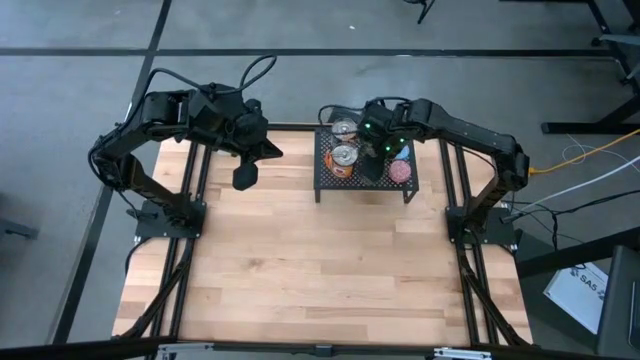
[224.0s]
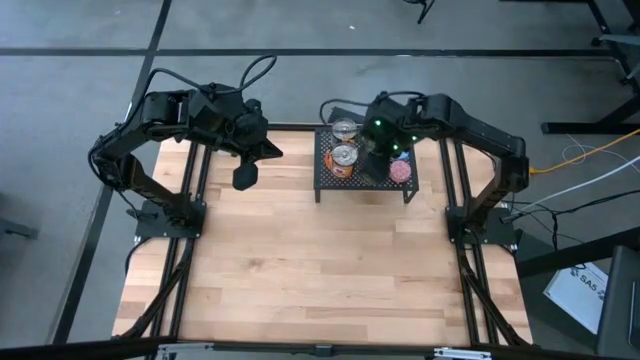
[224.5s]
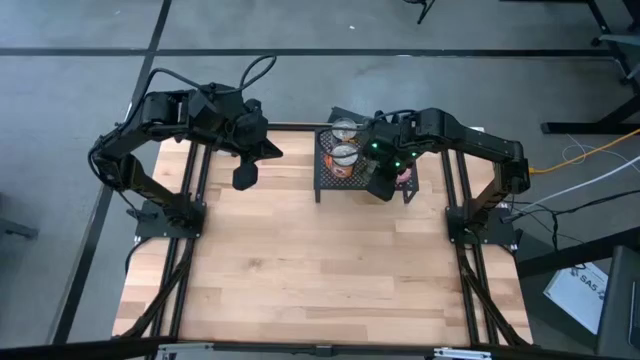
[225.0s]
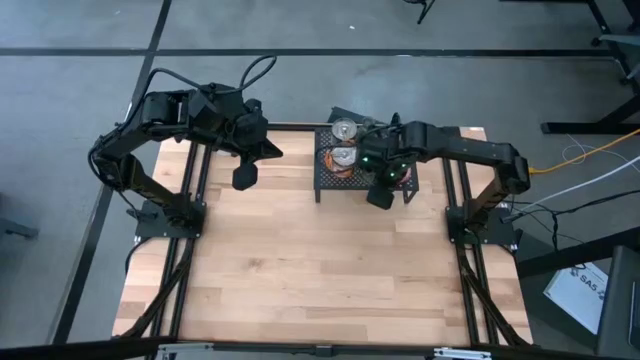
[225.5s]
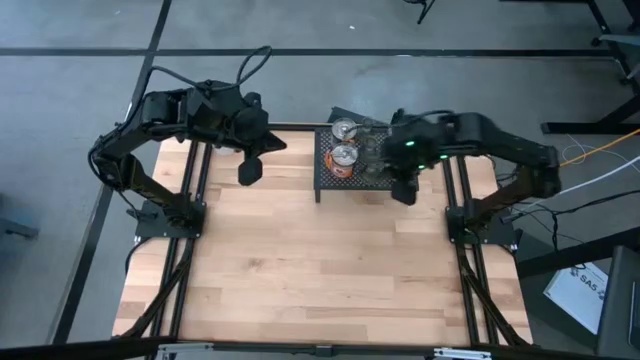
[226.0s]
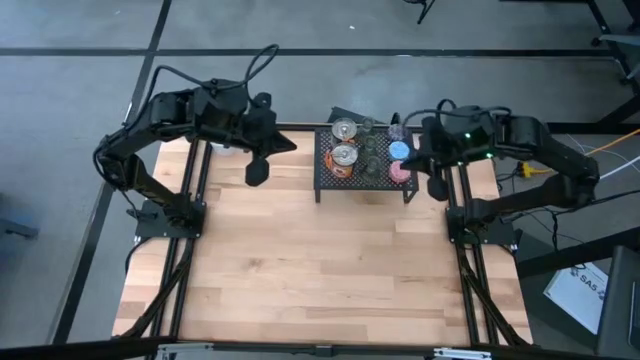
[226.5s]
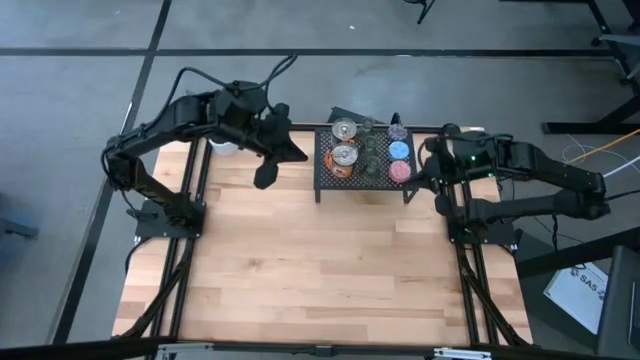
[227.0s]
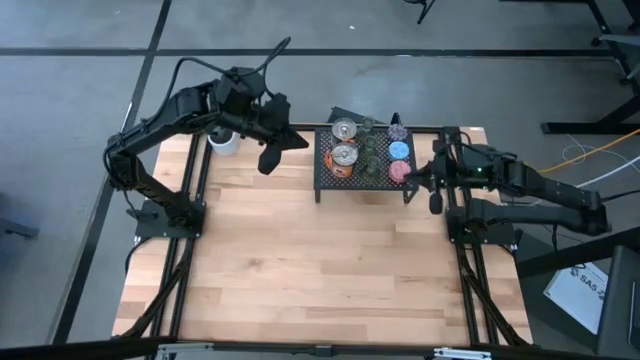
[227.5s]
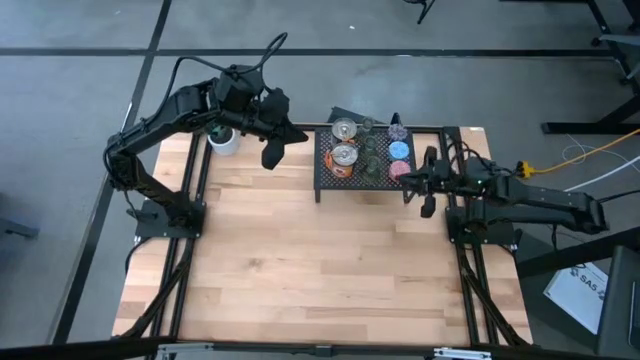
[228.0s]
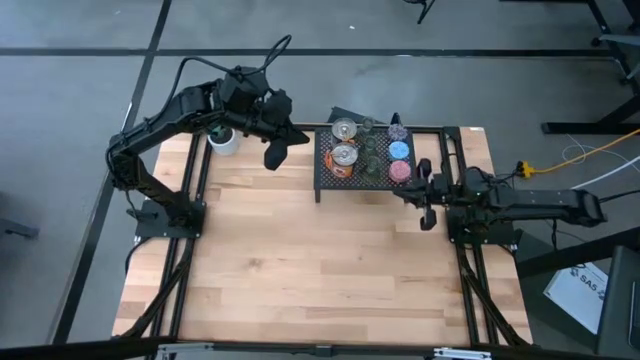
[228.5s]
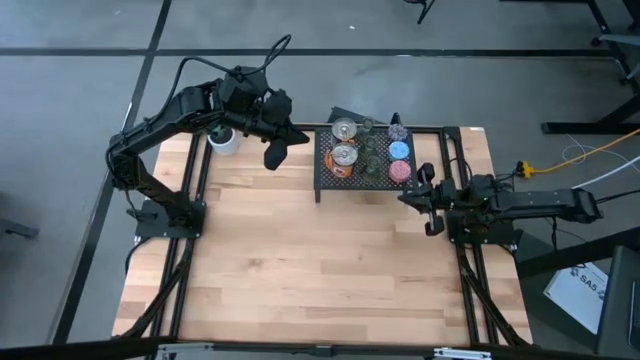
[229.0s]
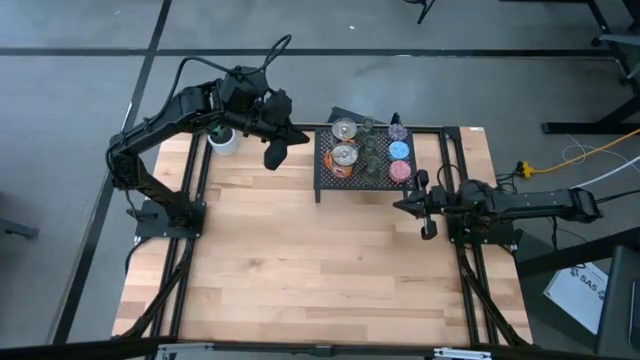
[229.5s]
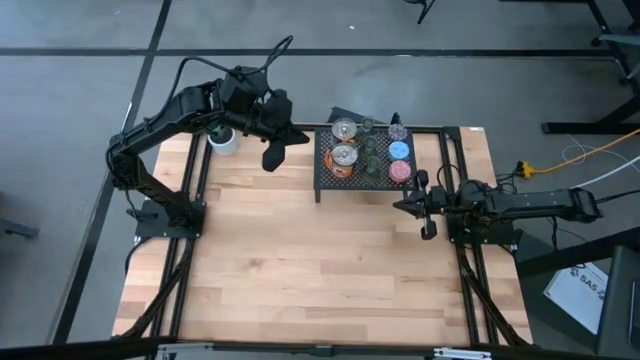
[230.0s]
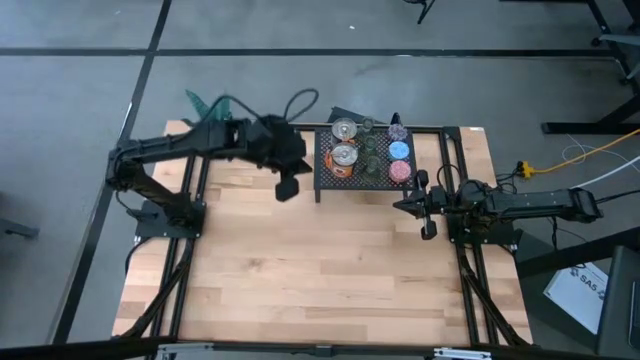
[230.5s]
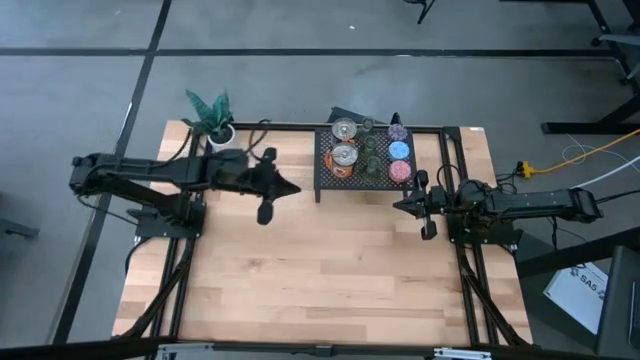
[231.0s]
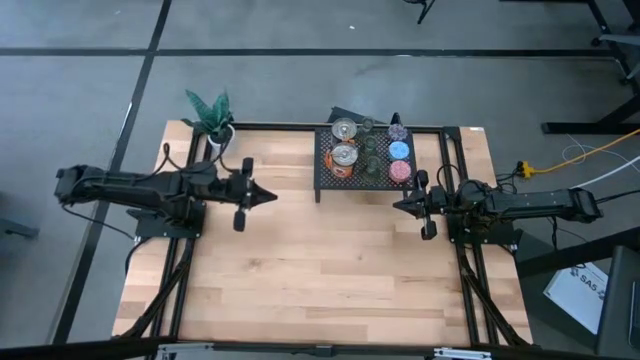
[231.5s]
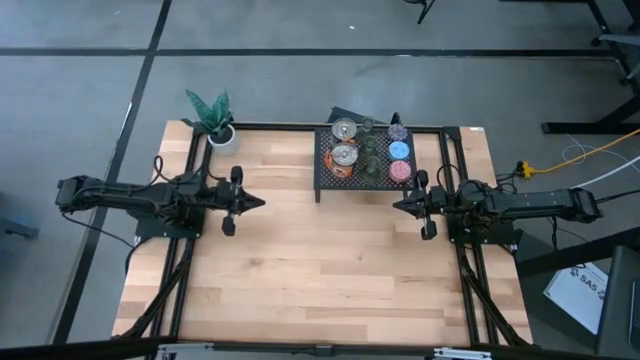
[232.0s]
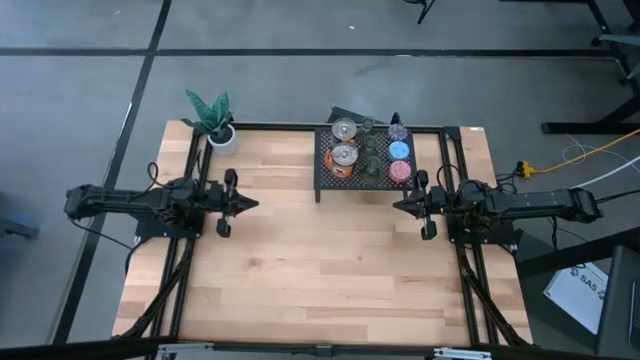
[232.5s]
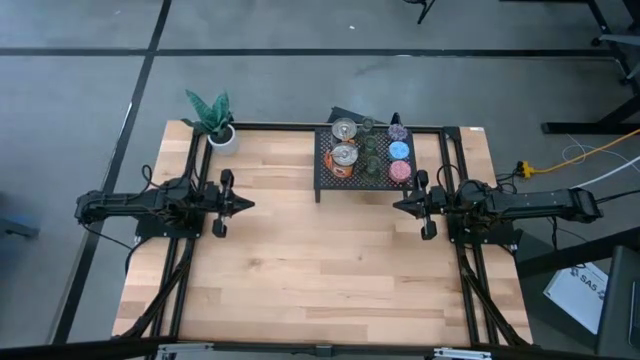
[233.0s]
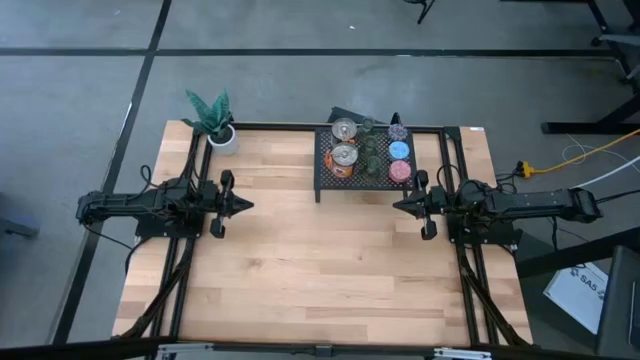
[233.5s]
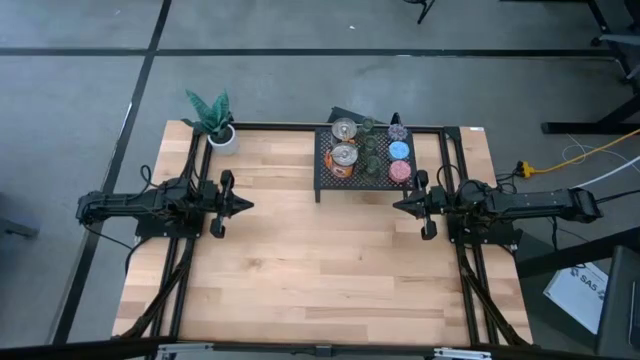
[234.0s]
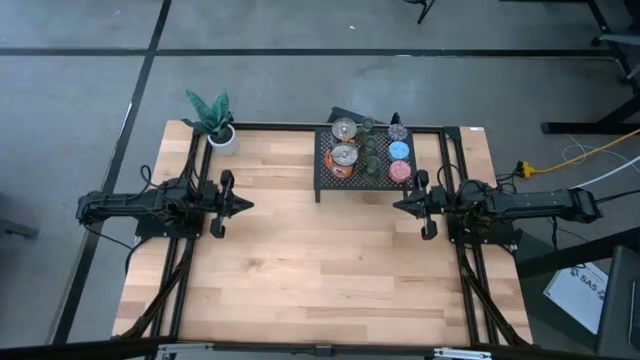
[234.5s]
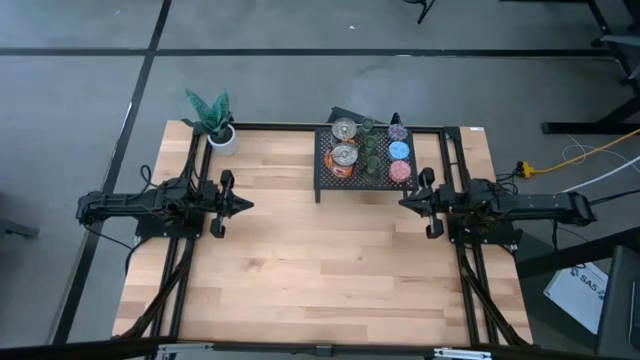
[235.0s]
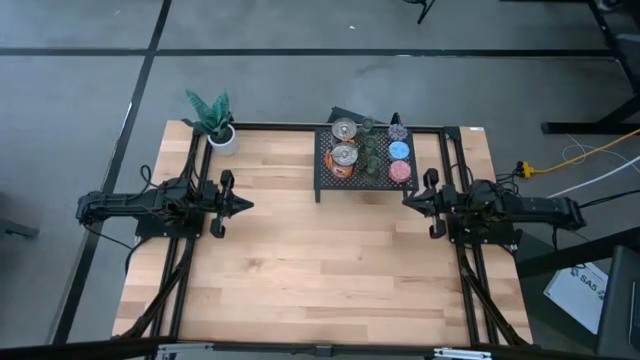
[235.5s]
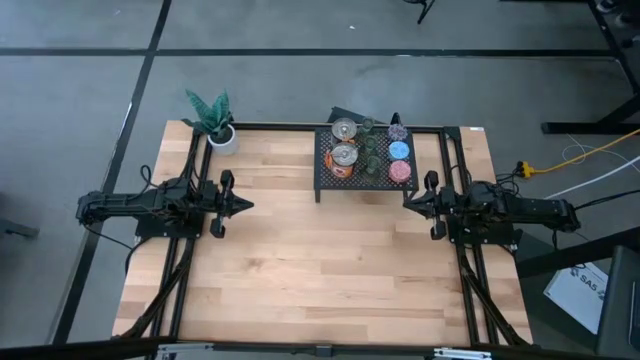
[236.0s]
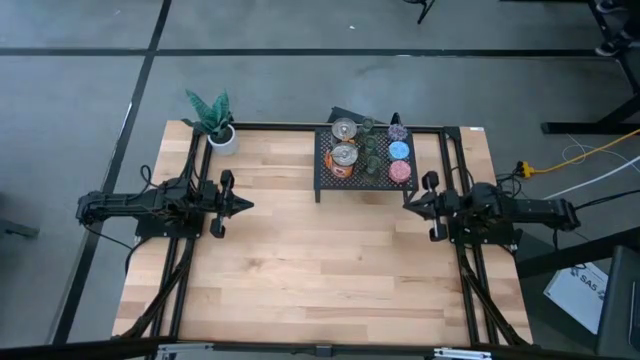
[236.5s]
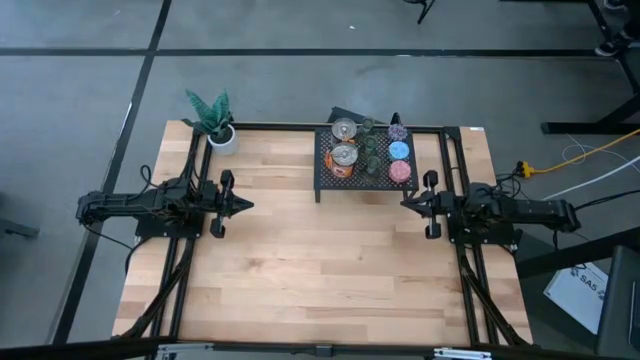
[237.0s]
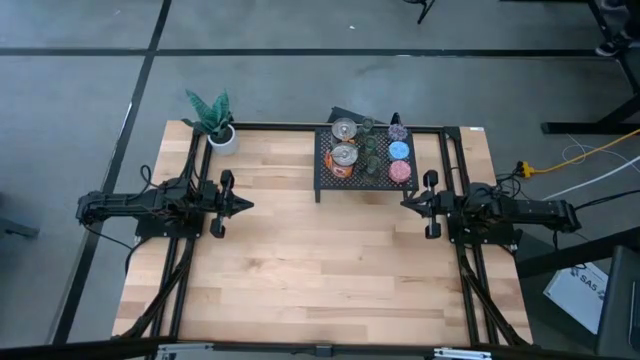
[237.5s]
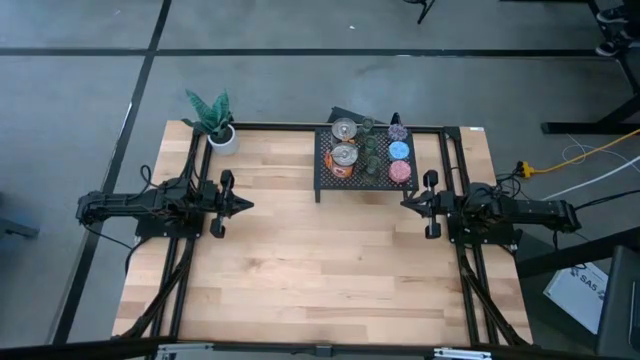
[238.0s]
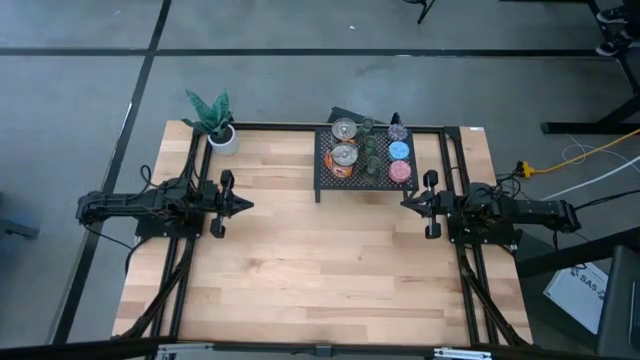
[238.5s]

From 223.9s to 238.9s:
Task: Pick & Place candle stick holders
Return to Home Position

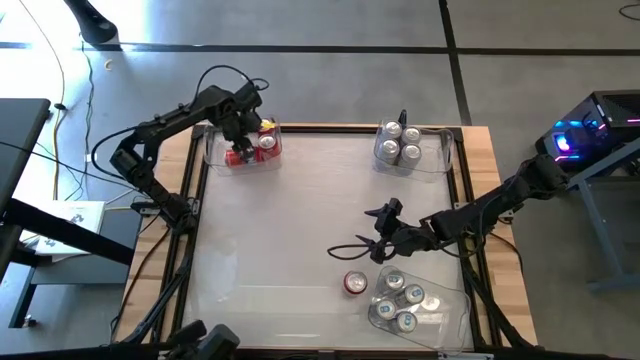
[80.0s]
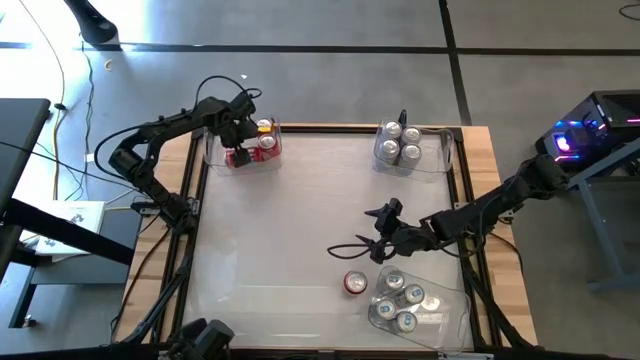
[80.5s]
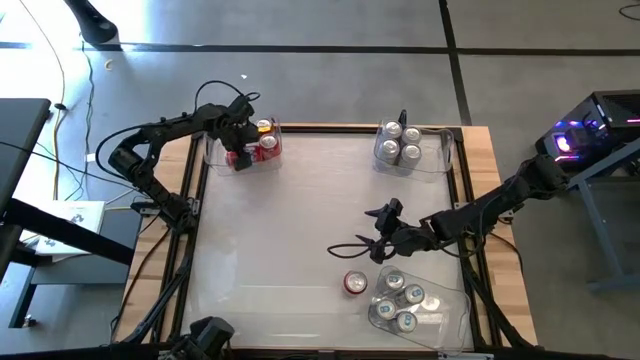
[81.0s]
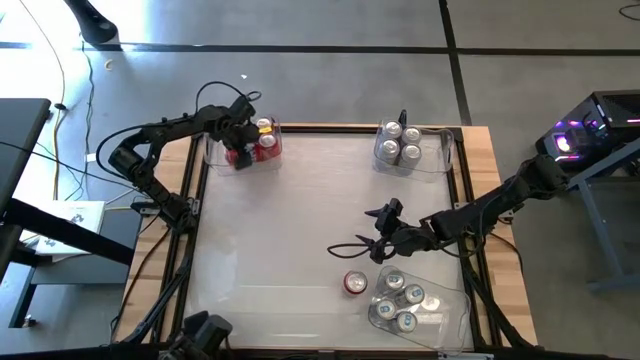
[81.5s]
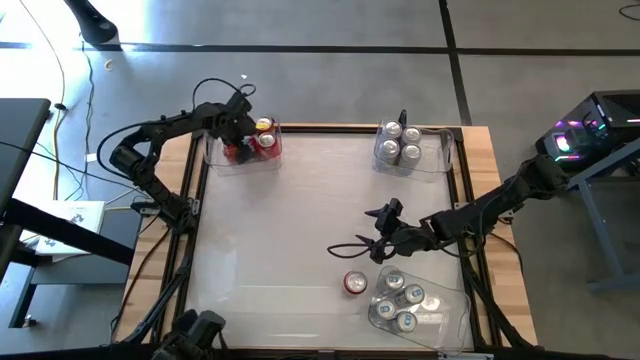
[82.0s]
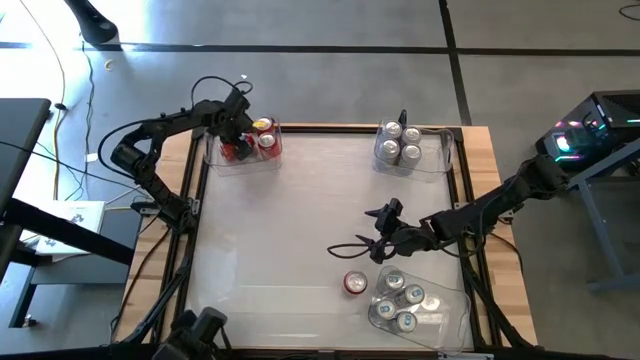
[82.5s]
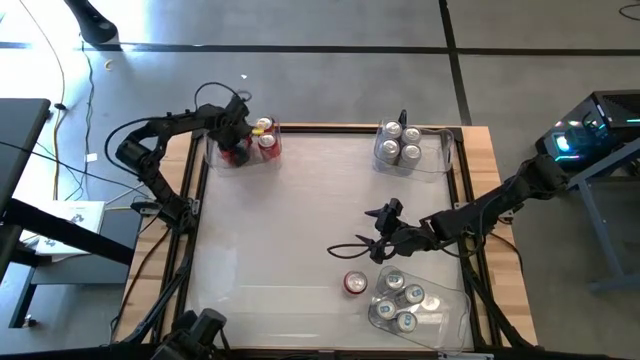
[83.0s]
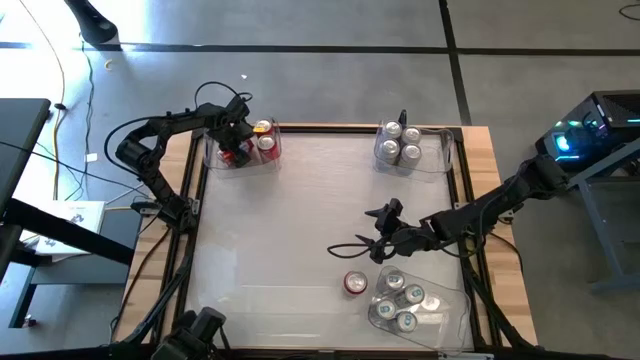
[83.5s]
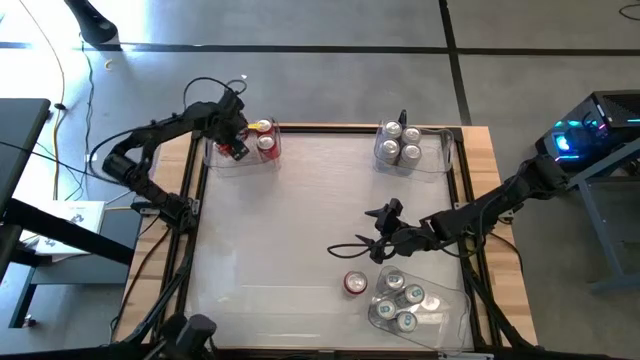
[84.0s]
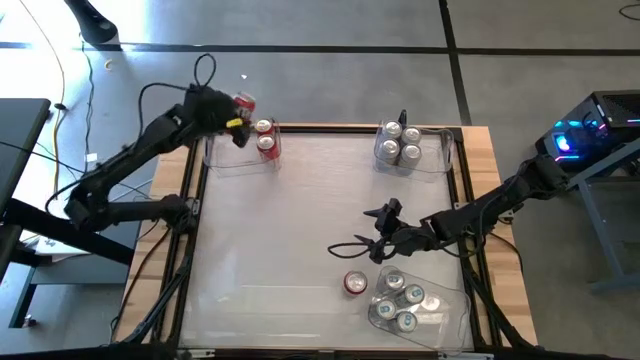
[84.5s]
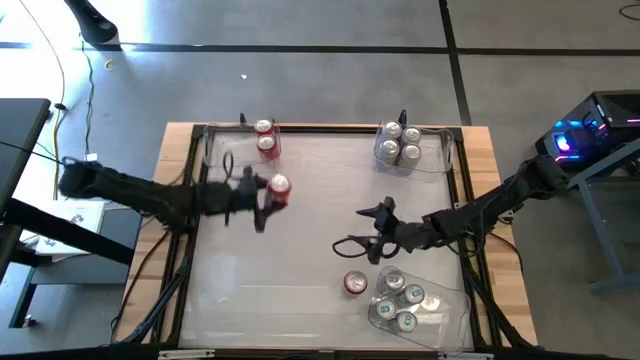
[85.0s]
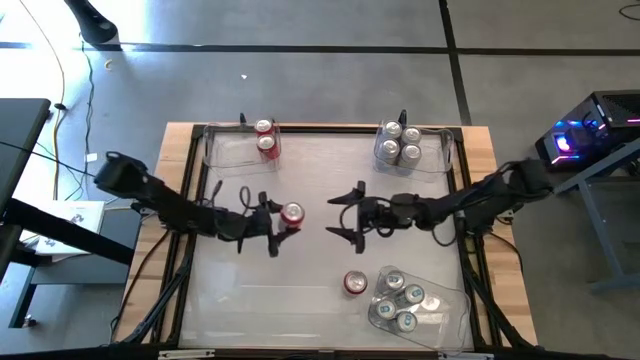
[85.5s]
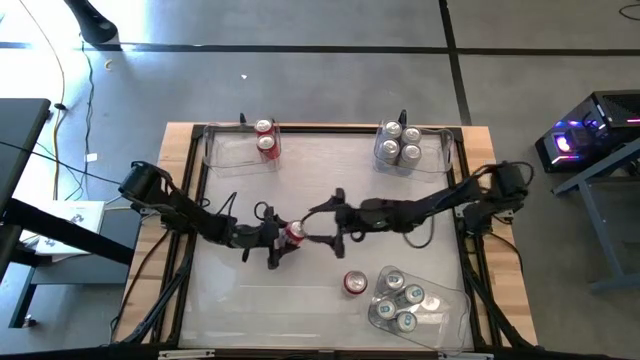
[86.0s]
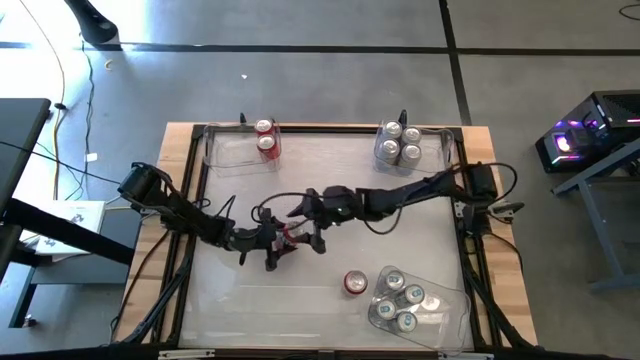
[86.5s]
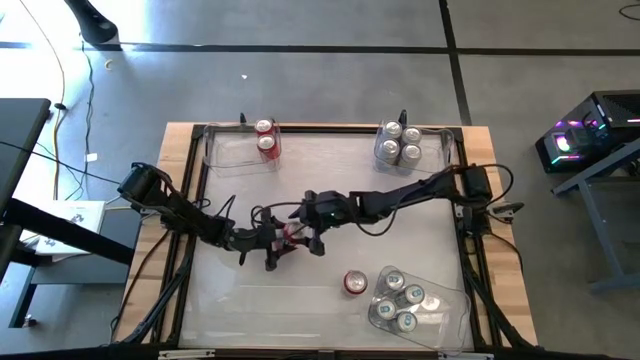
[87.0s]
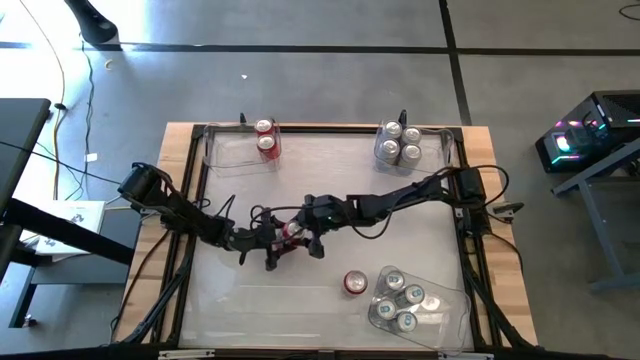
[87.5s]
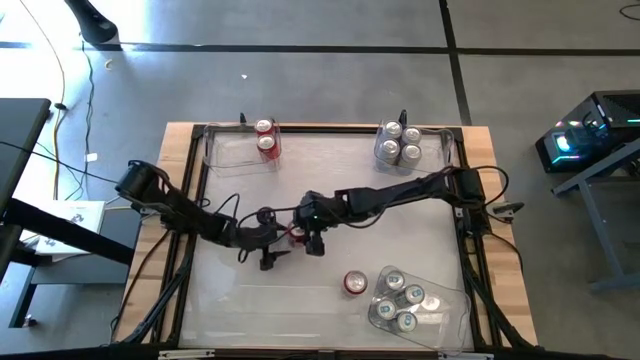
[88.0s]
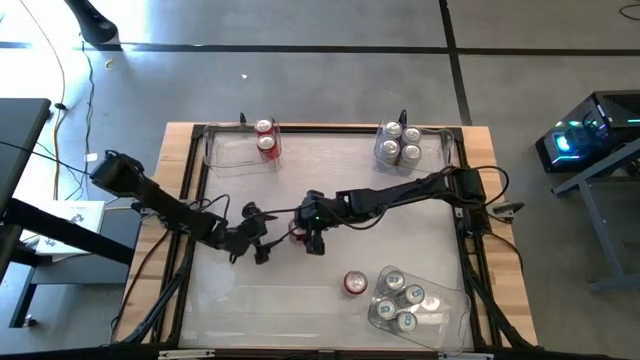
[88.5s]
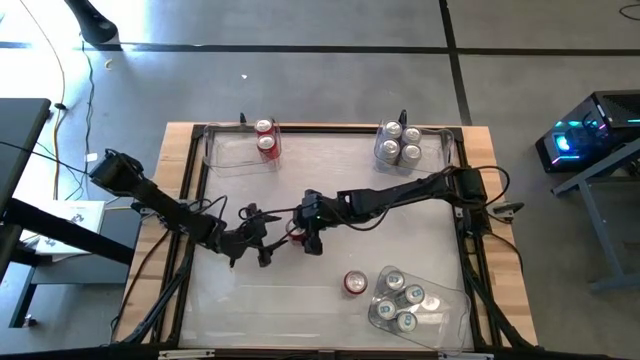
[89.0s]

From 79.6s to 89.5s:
Task: Sort soda cans
Remove the red soda can from the top left transparent bin
